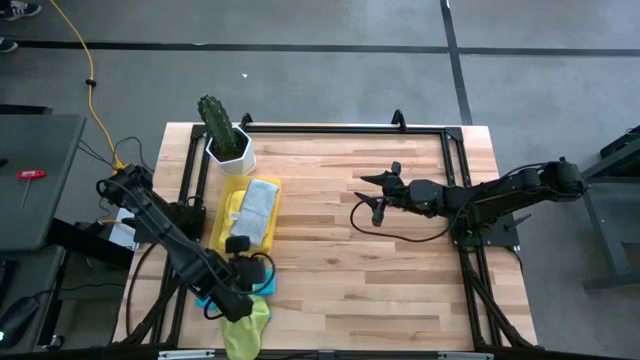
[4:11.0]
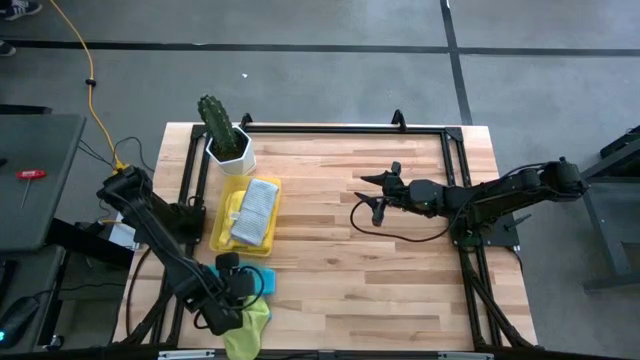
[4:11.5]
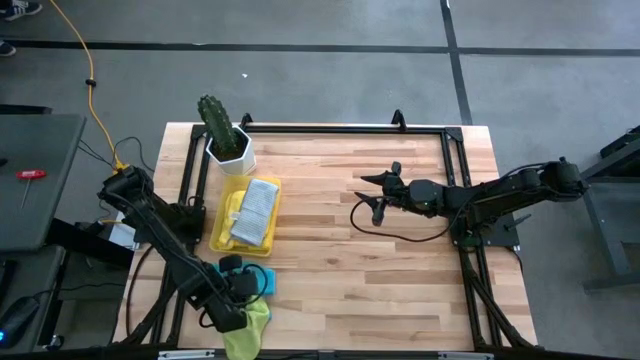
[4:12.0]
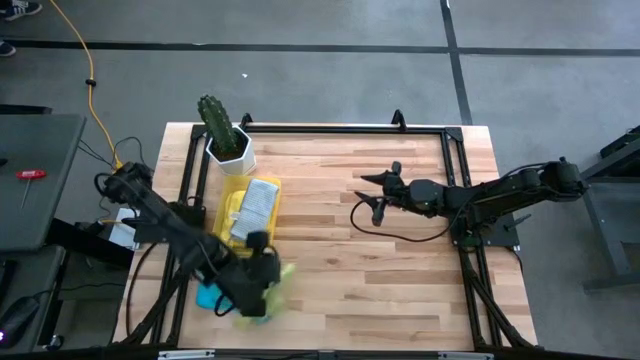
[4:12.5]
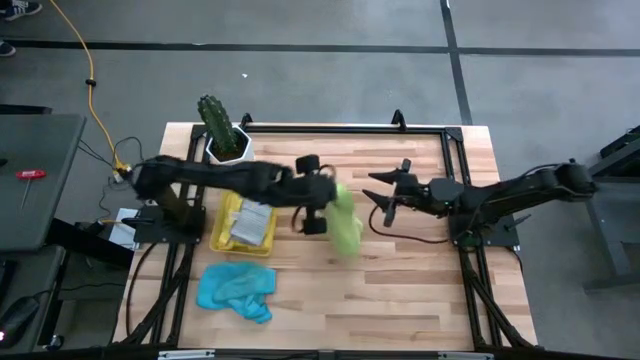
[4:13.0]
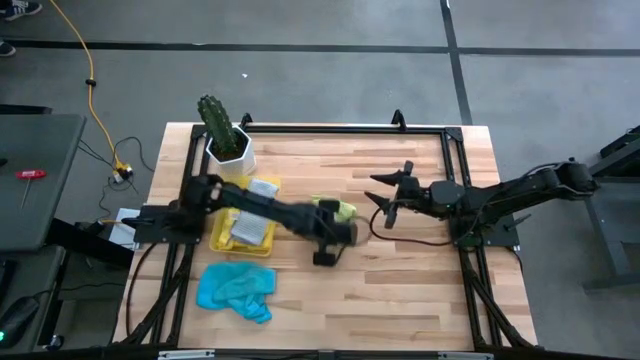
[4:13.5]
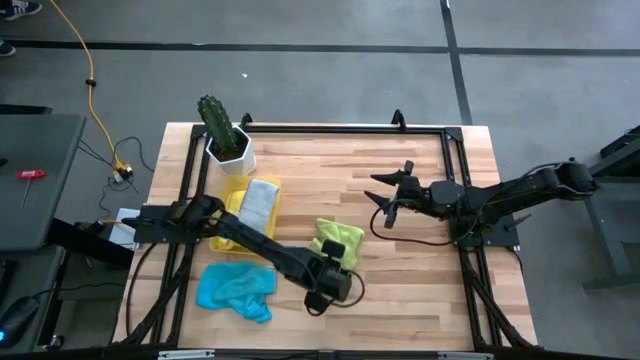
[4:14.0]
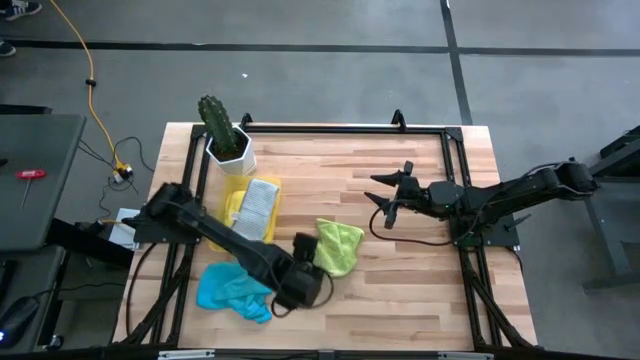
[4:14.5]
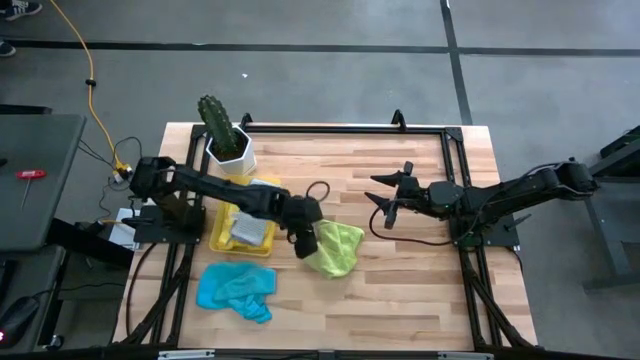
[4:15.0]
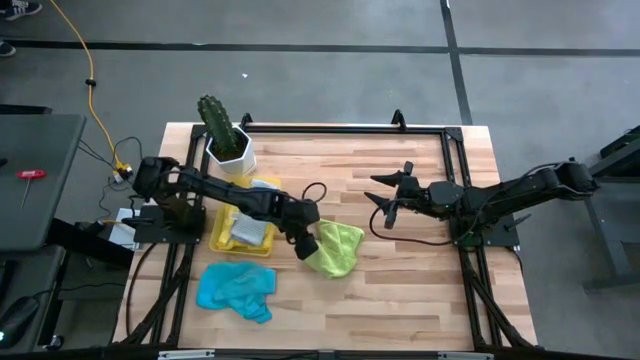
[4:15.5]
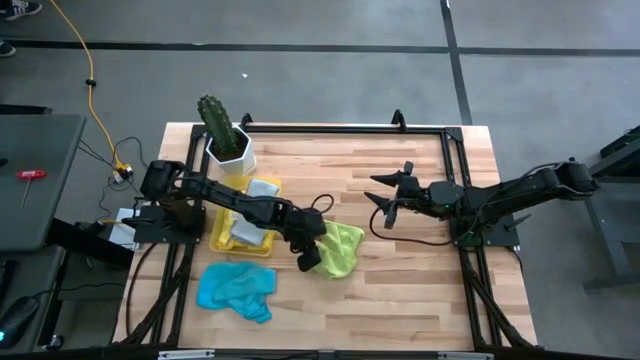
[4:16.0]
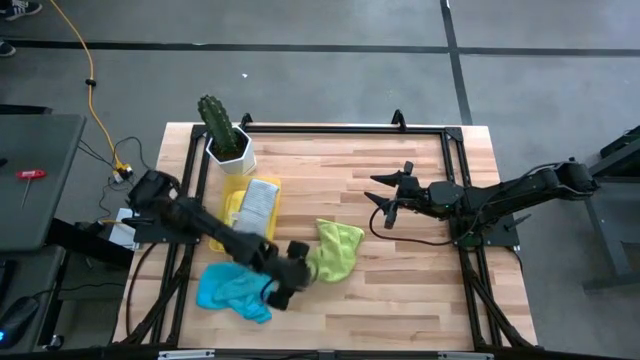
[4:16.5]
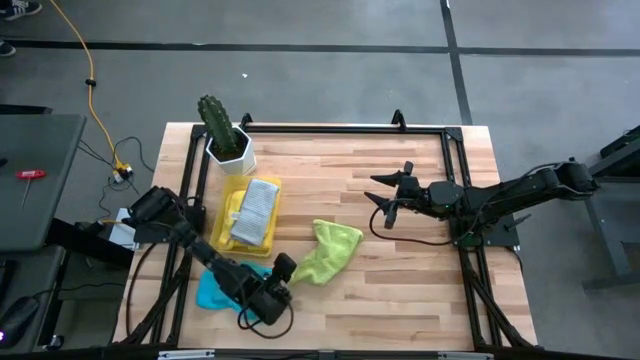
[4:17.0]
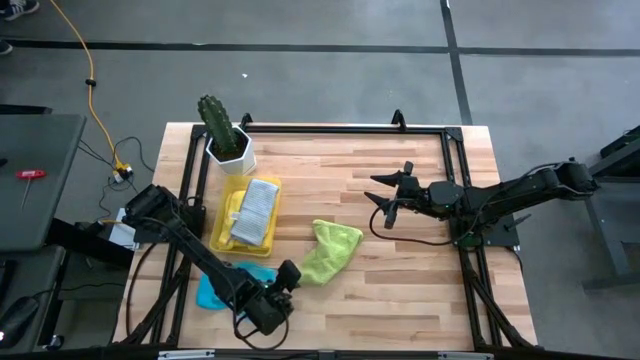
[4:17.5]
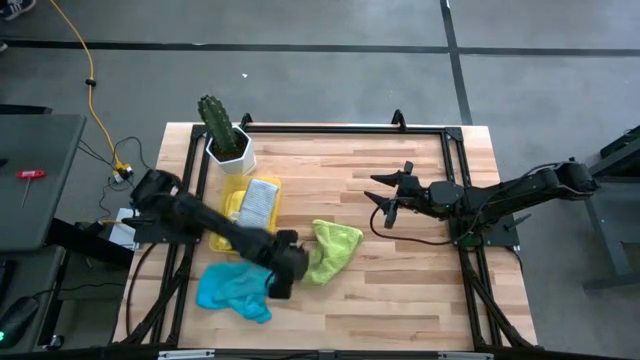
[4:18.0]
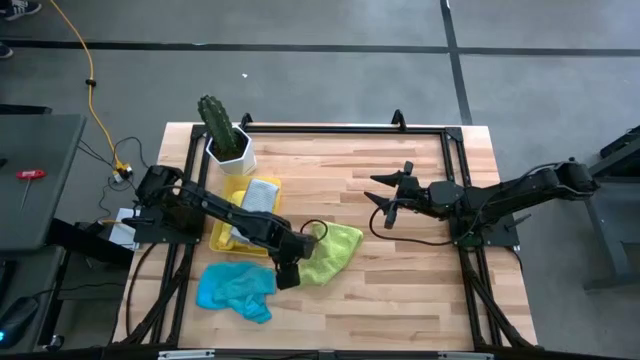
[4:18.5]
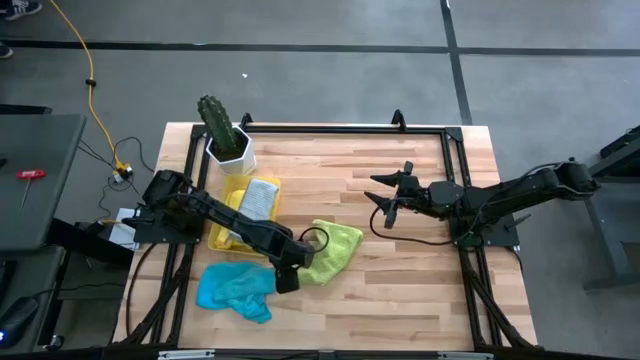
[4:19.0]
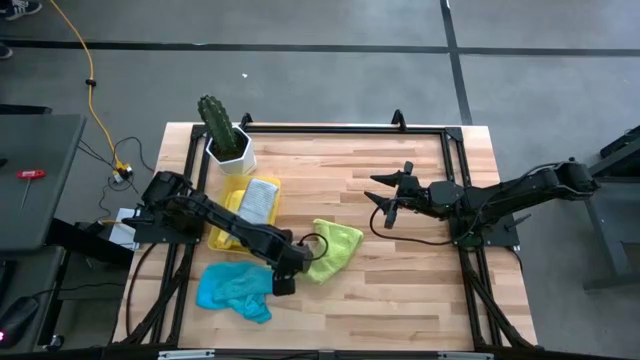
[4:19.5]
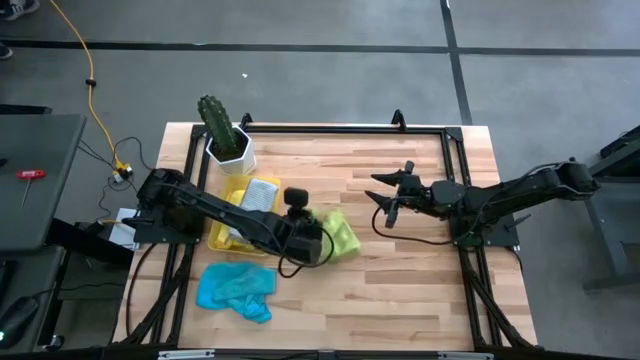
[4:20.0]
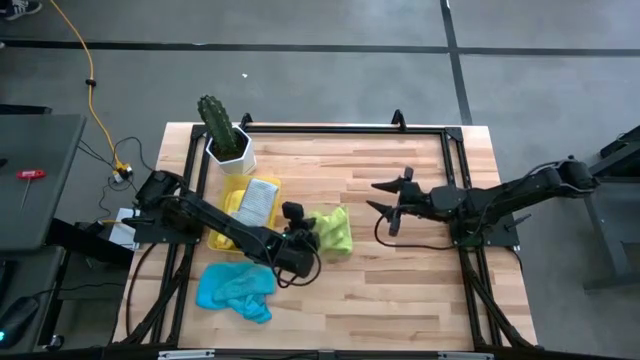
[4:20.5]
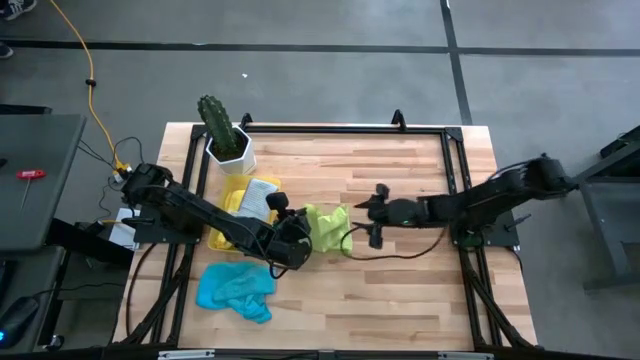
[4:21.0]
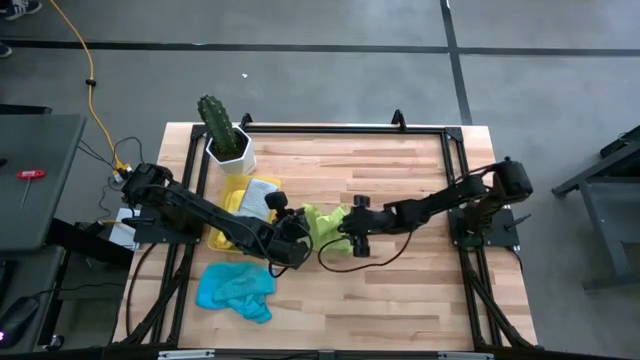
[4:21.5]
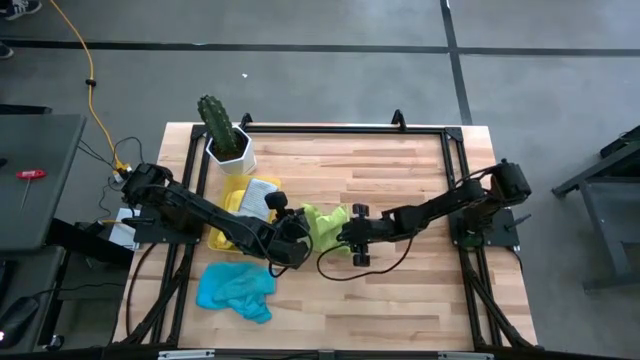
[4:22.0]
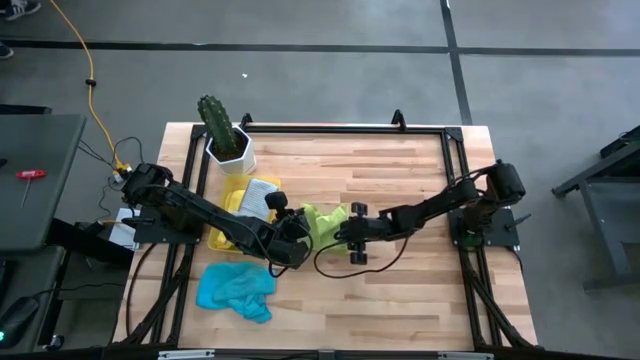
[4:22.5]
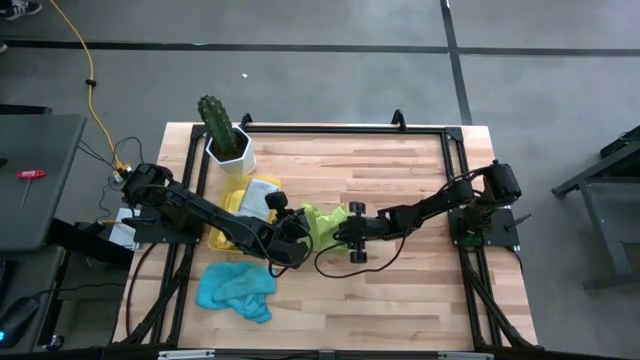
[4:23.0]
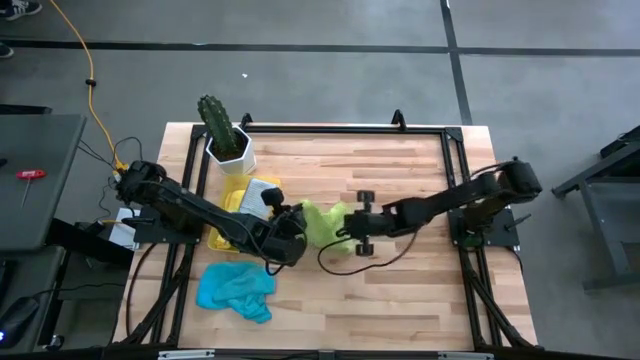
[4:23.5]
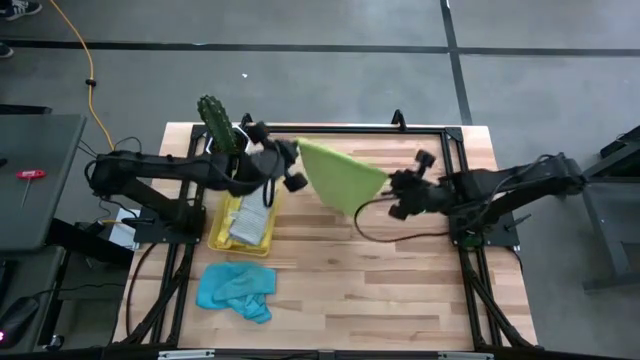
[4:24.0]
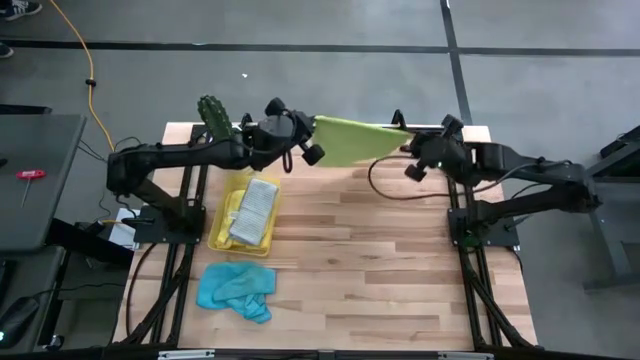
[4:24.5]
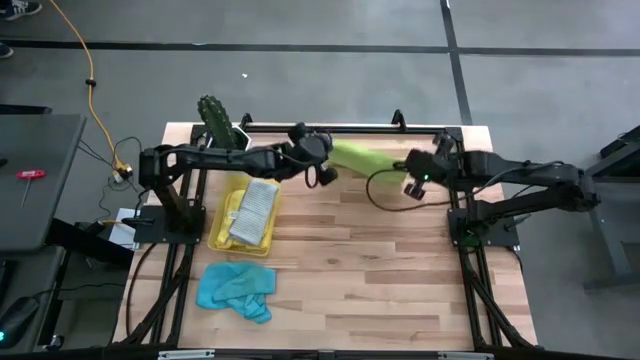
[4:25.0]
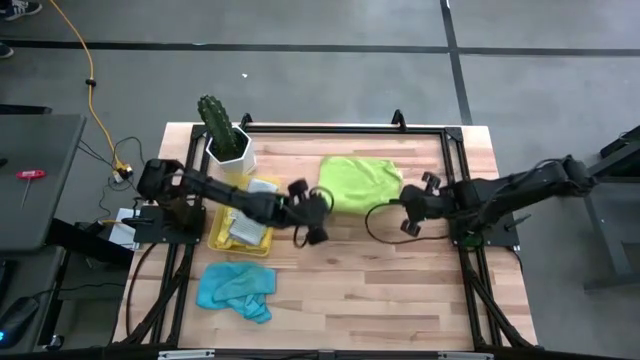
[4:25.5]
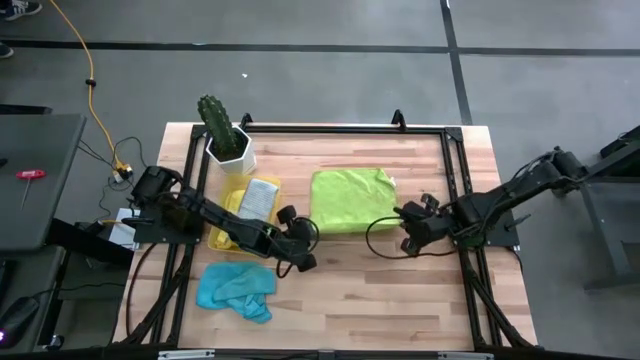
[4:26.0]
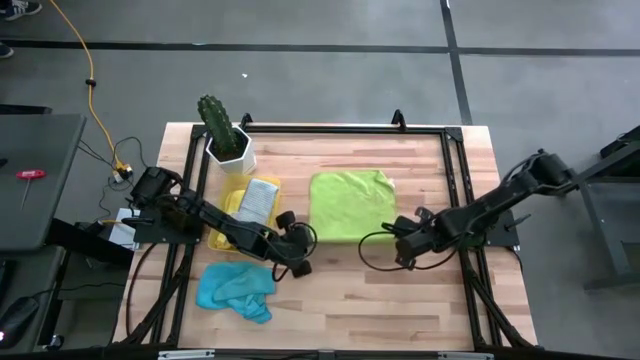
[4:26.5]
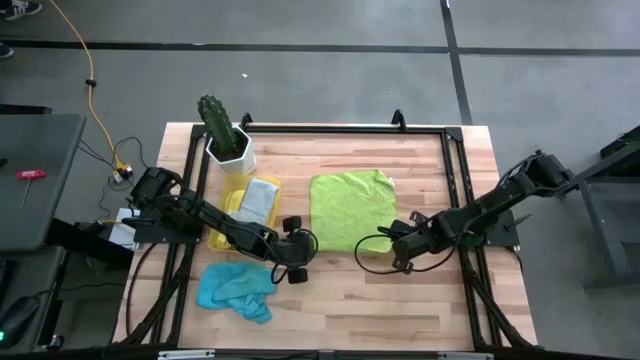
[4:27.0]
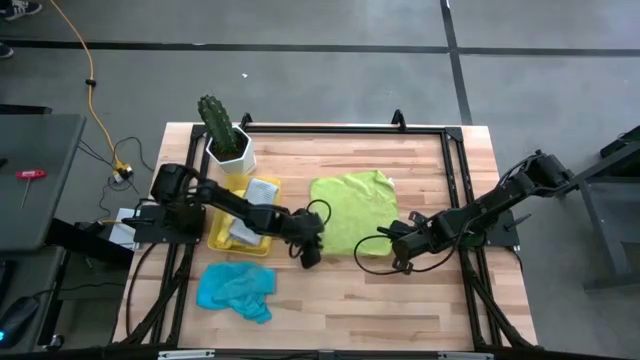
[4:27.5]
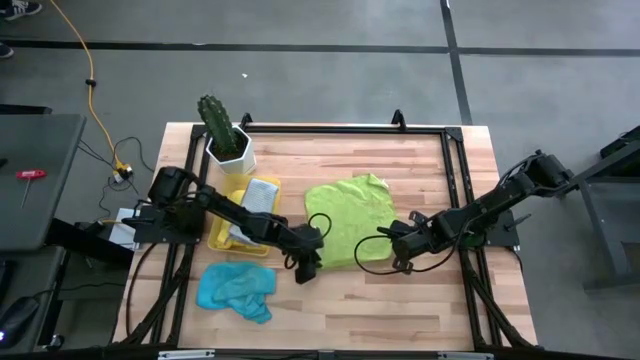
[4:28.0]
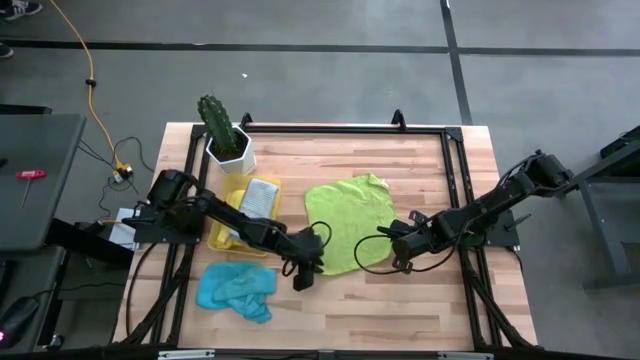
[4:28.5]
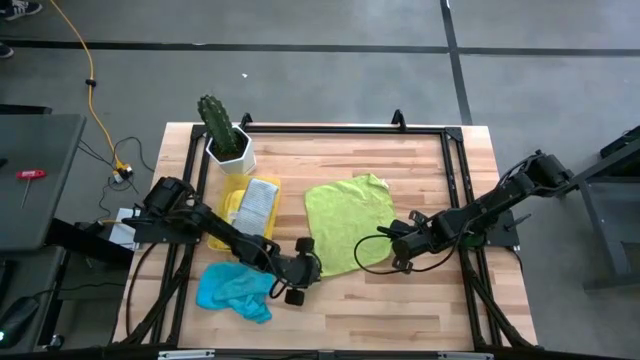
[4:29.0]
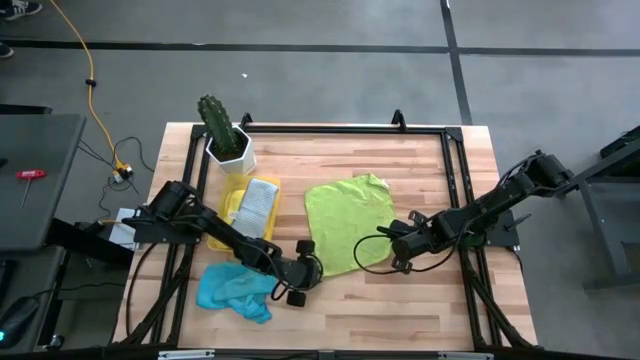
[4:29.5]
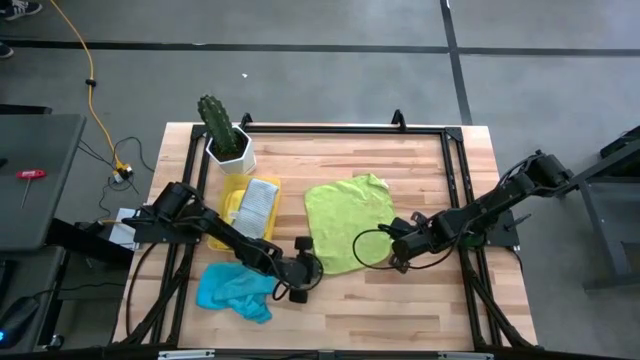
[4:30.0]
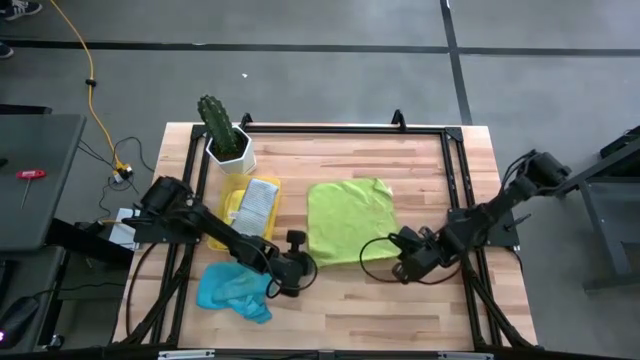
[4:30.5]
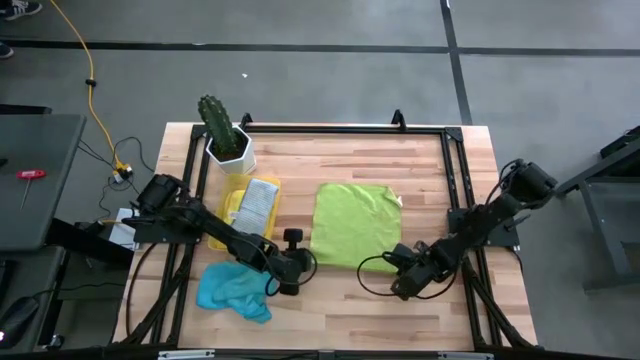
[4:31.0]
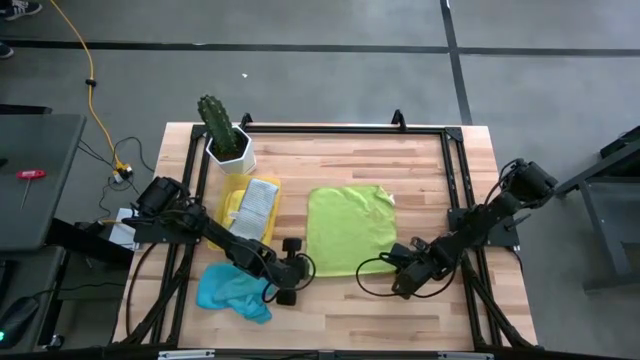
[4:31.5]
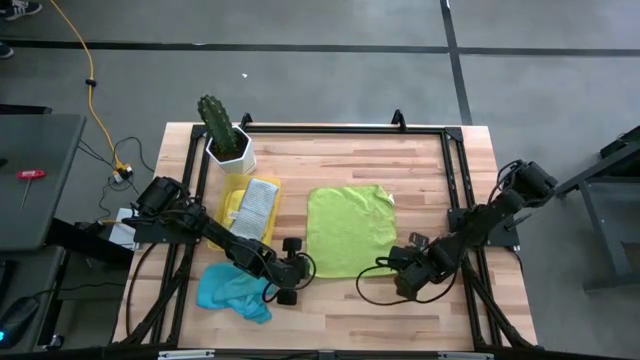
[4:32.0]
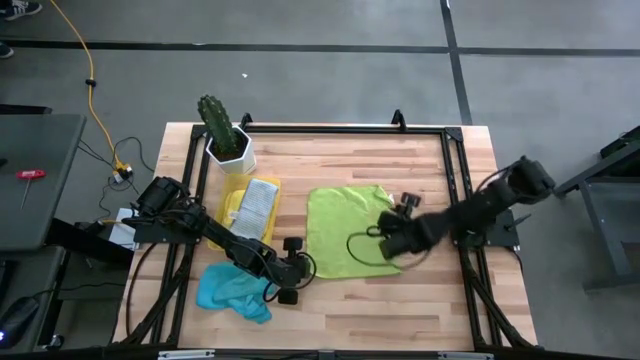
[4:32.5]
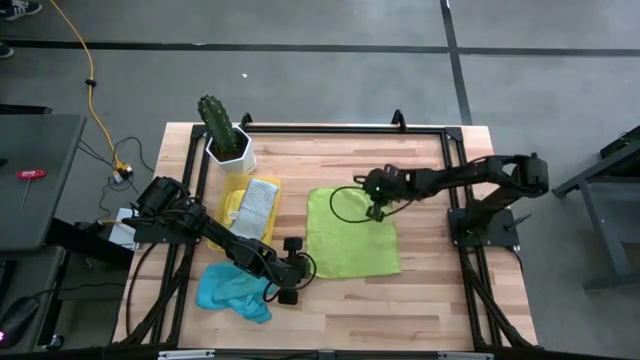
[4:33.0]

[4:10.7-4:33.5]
Task: Fold microfiber towels
Fold the green microfiber towel
